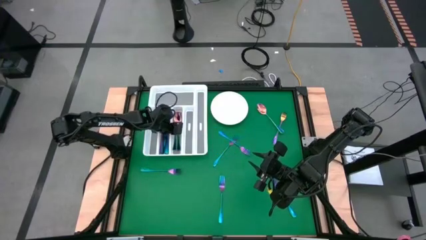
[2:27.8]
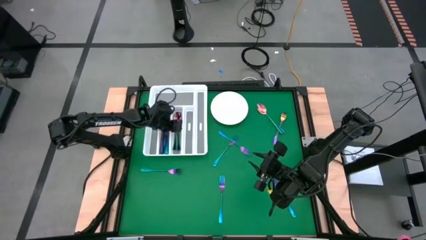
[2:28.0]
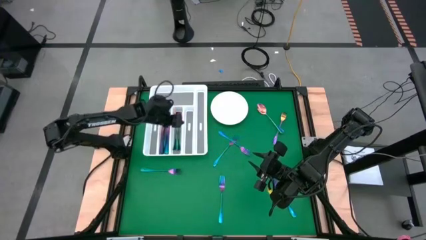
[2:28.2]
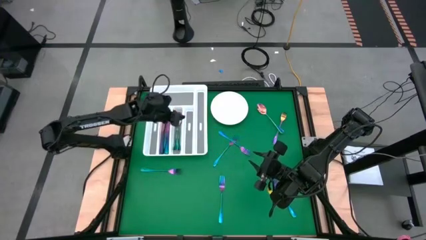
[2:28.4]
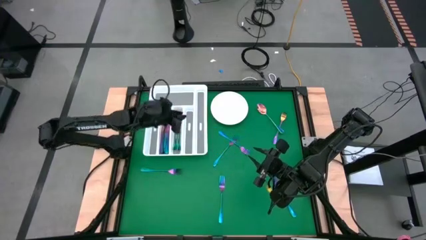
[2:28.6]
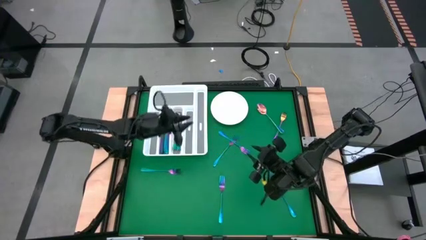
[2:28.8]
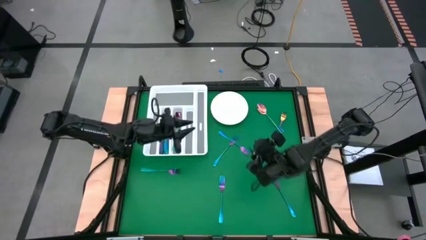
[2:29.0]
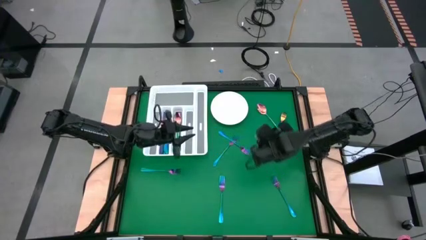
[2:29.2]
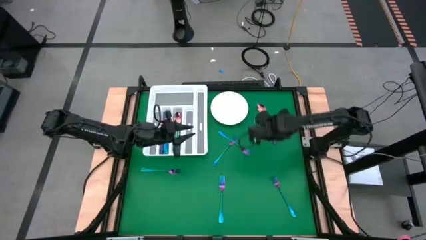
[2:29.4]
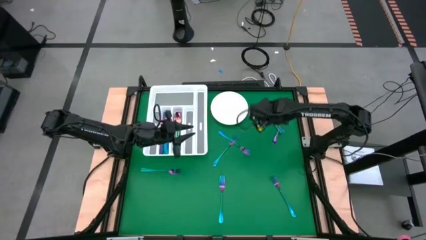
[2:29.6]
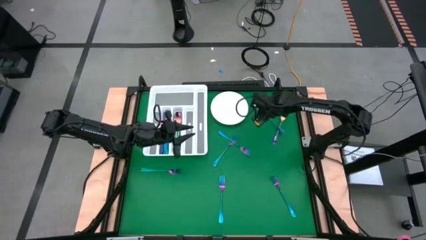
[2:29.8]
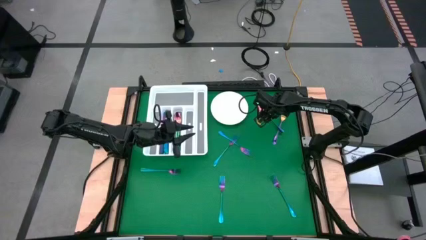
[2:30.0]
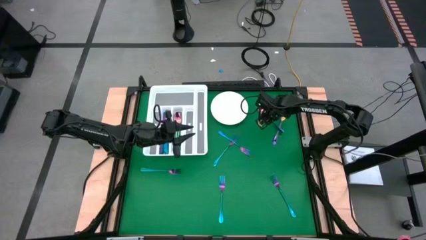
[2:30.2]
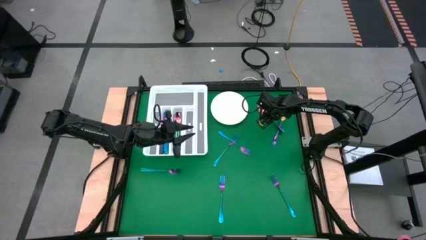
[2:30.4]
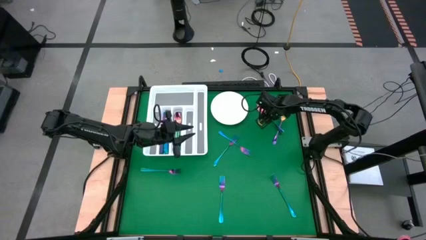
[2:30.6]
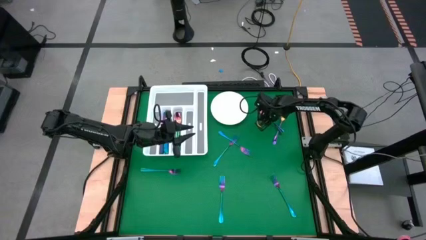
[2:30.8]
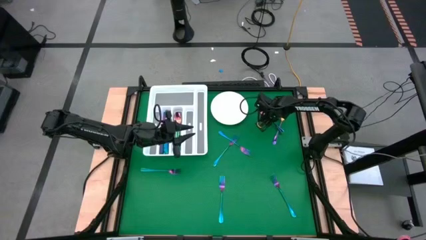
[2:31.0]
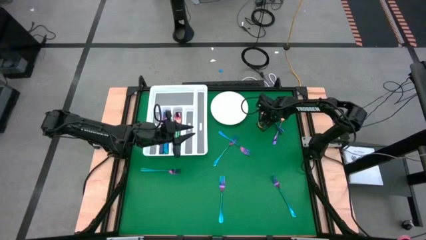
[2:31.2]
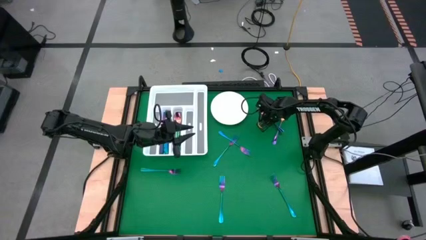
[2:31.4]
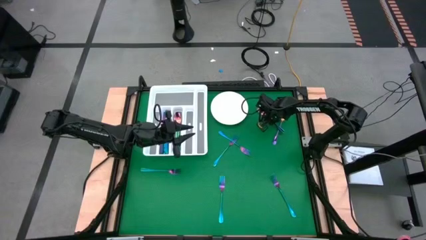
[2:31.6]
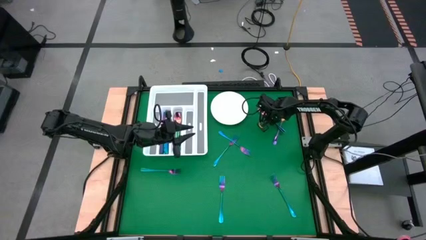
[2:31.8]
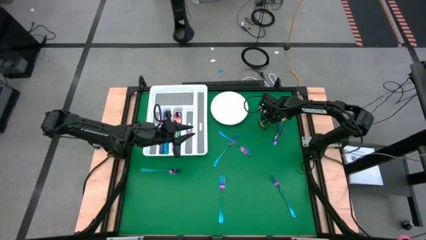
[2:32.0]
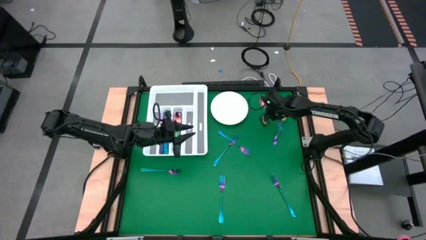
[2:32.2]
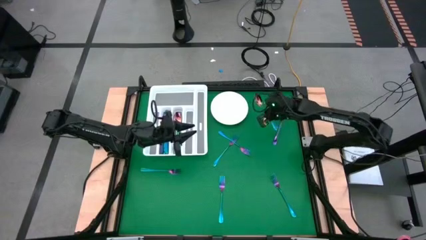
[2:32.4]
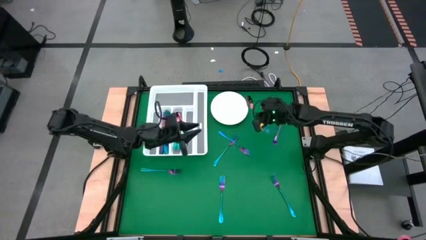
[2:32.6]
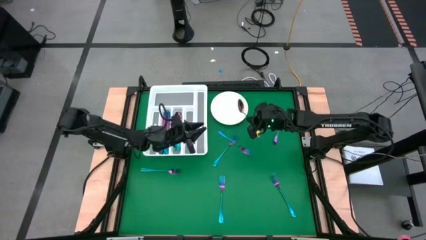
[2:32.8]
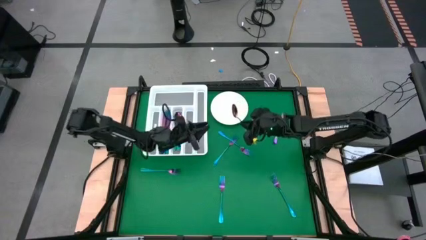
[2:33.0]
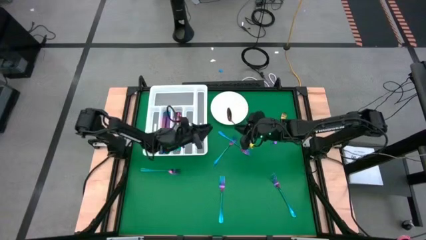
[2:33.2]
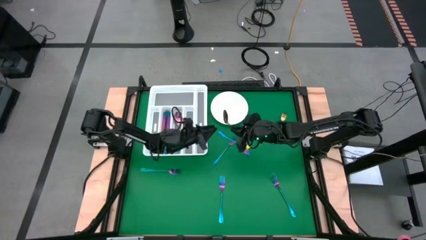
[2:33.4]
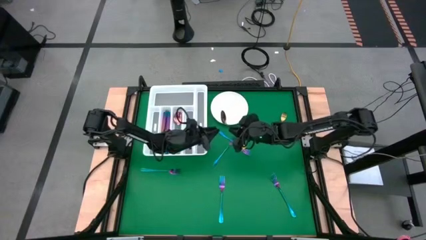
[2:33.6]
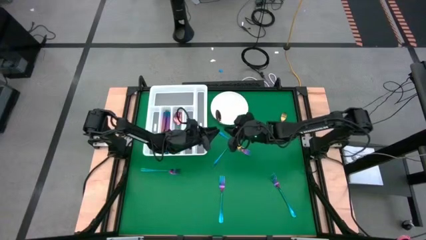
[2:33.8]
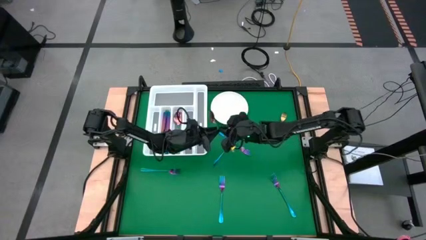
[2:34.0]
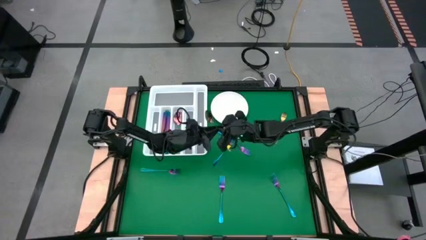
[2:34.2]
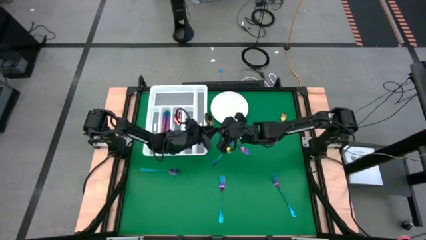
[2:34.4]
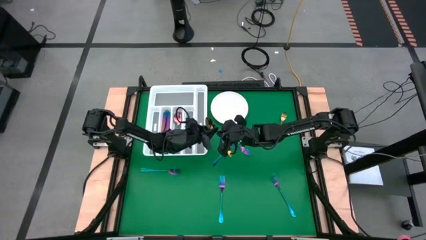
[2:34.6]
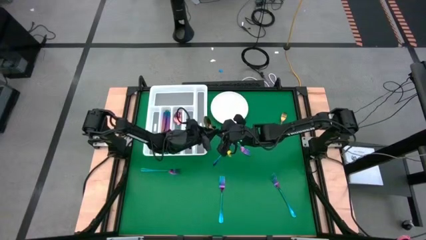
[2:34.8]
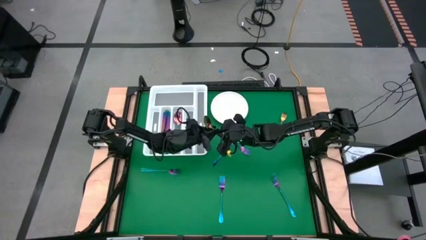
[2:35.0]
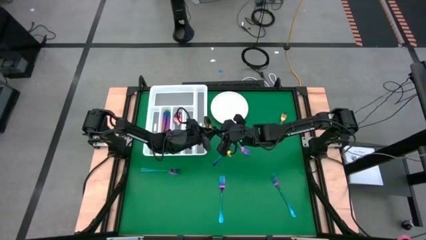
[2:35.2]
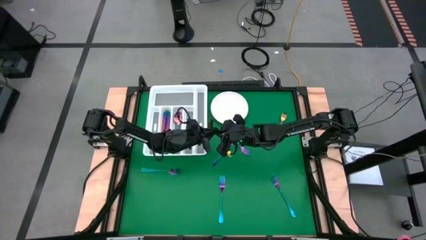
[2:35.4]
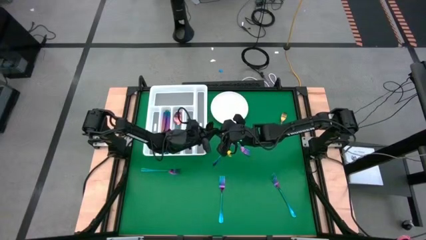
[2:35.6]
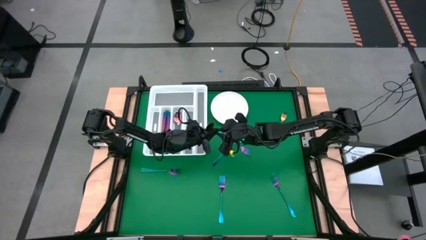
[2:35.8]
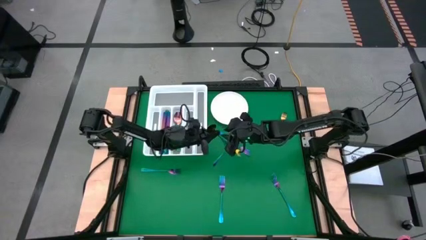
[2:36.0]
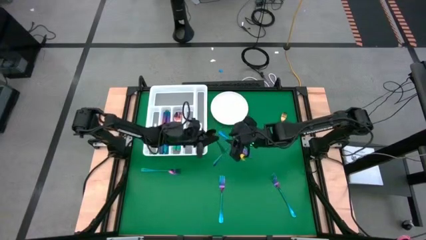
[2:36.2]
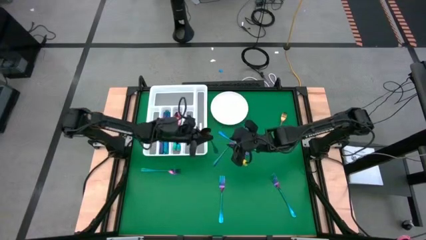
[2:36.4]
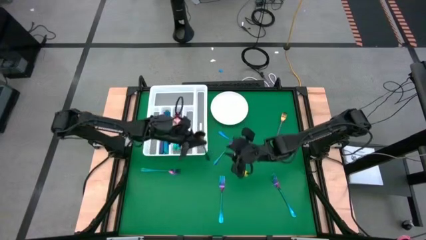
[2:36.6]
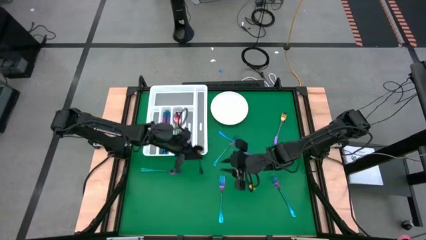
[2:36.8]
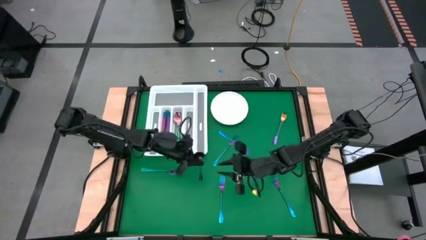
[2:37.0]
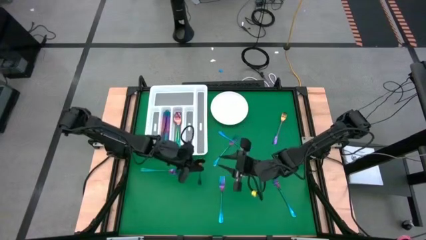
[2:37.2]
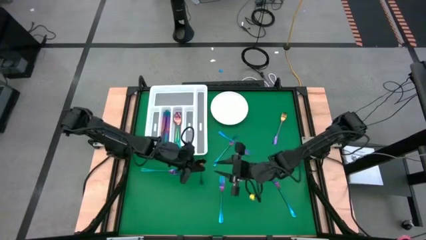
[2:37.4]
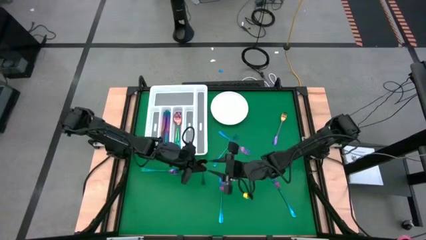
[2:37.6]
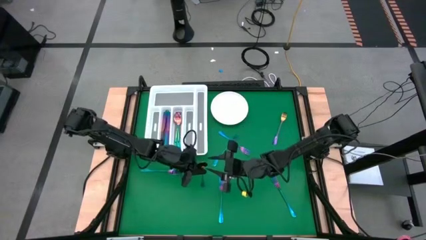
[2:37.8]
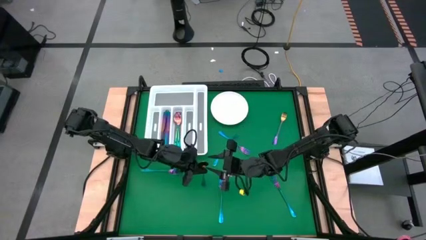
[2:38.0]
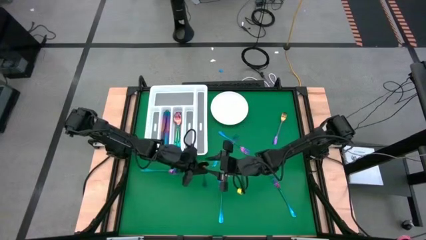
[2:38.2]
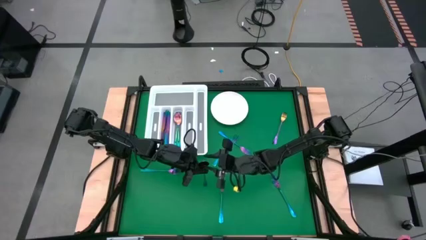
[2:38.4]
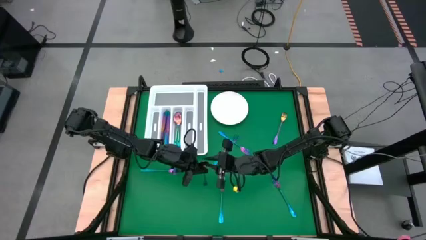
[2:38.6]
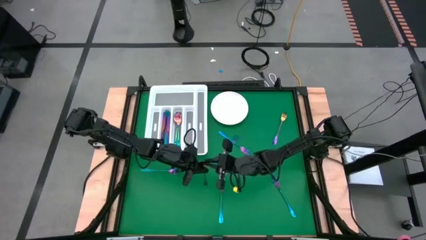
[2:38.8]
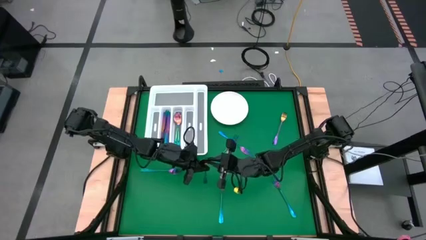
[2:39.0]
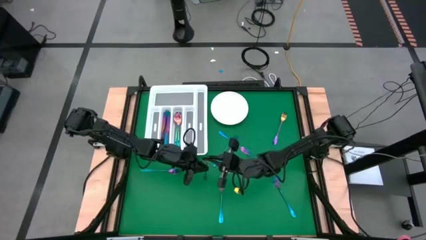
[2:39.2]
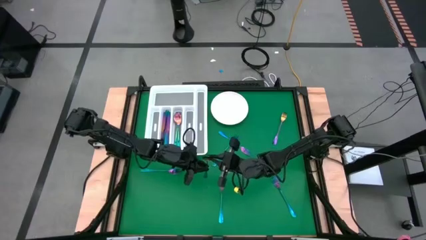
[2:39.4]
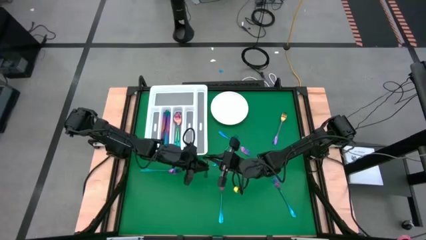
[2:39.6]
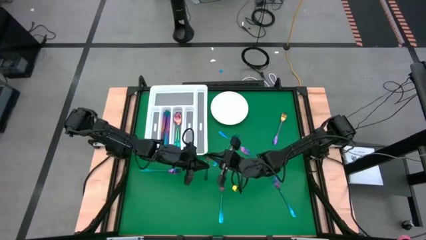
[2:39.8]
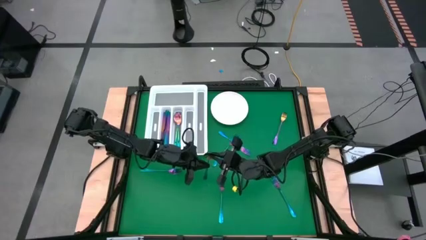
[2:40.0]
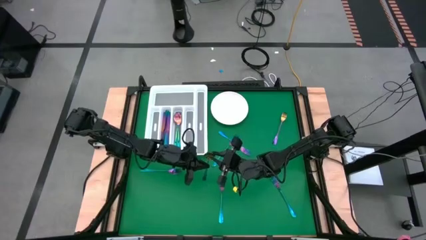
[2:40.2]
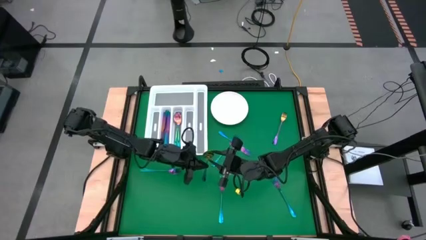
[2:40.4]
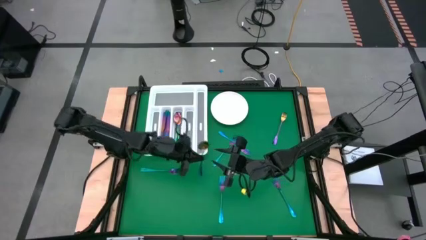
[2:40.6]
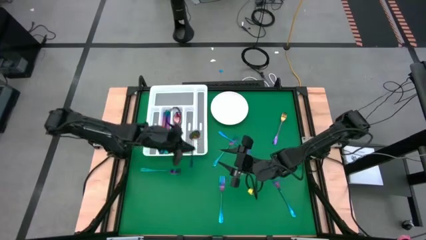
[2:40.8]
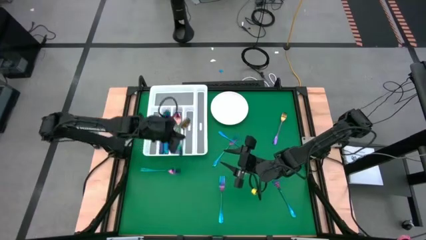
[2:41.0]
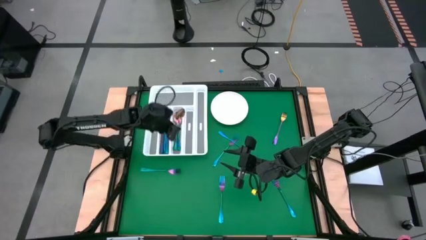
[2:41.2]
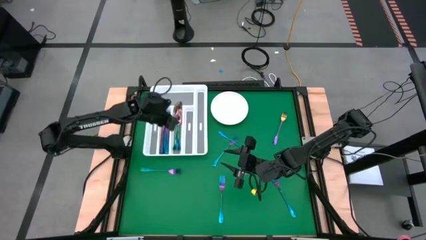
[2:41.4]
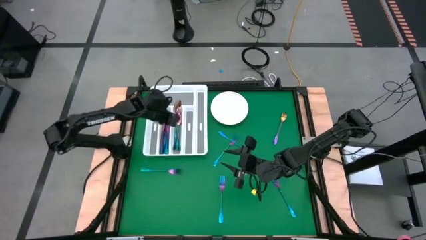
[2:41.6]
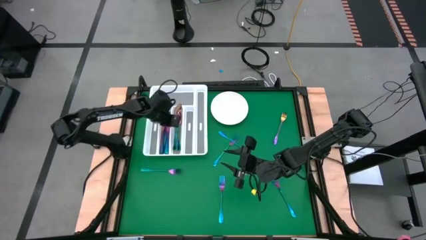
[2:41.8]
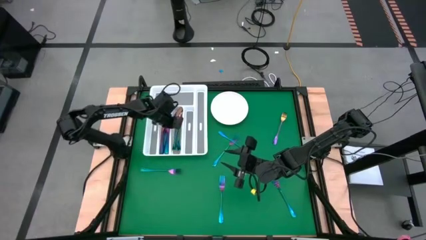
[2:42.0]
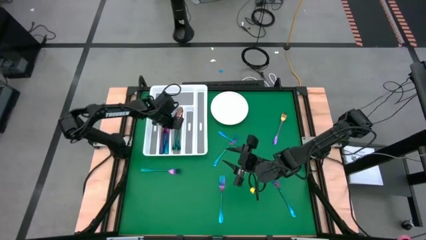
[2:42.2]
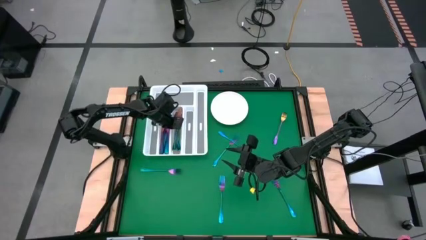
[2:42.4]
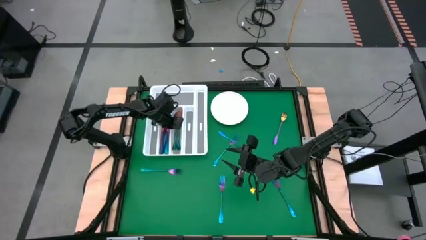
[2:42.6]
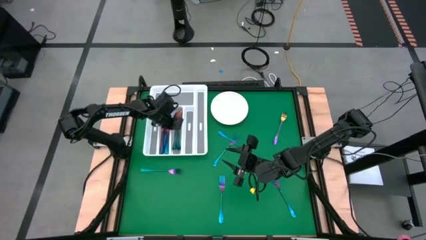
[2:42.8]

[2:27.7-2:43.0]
Task: Sort silverware
Put the blue spoon into the silverware tray
